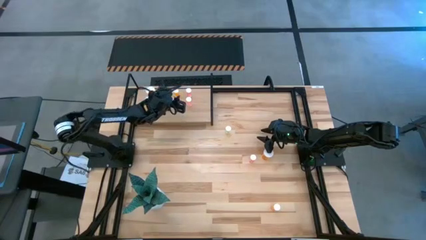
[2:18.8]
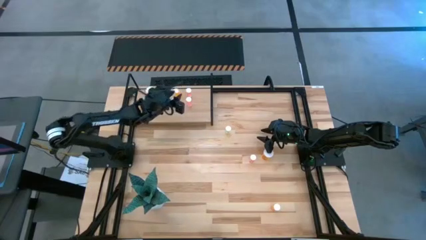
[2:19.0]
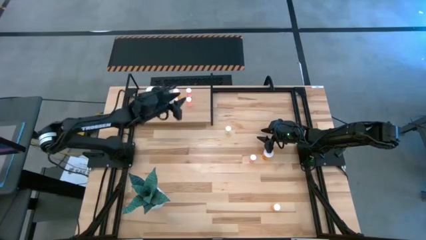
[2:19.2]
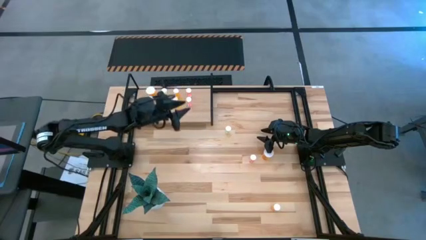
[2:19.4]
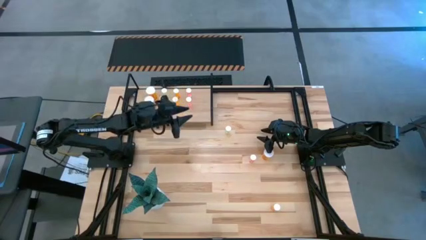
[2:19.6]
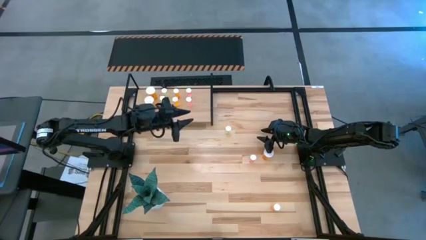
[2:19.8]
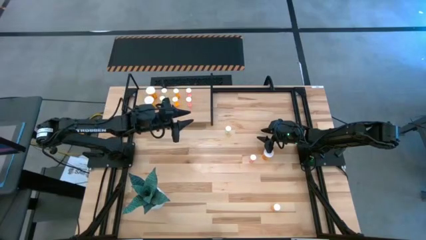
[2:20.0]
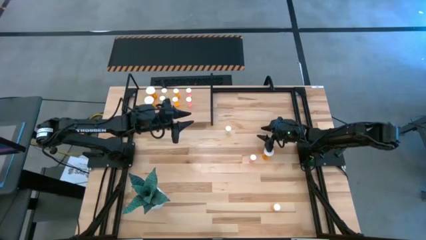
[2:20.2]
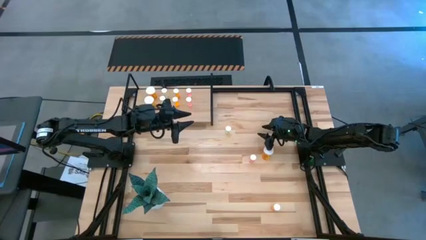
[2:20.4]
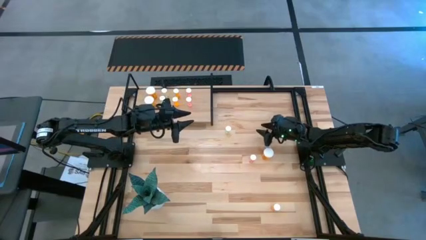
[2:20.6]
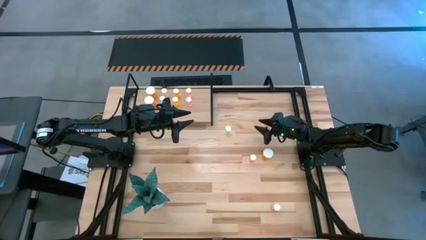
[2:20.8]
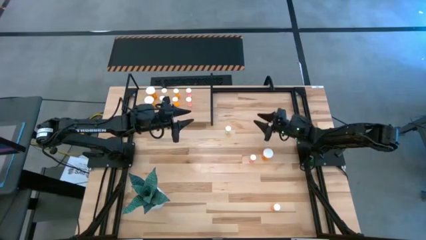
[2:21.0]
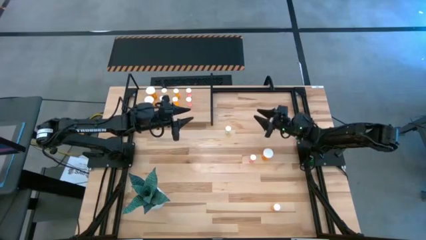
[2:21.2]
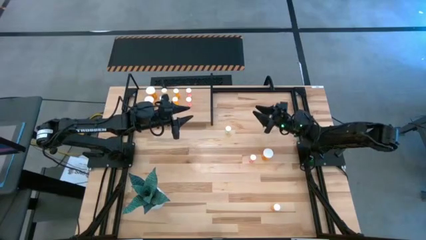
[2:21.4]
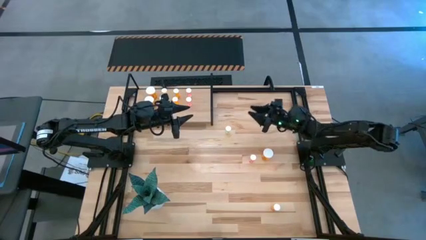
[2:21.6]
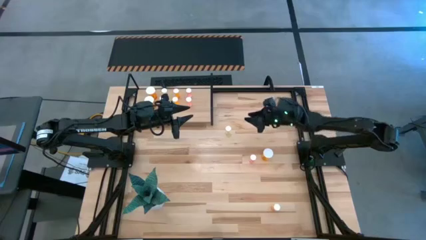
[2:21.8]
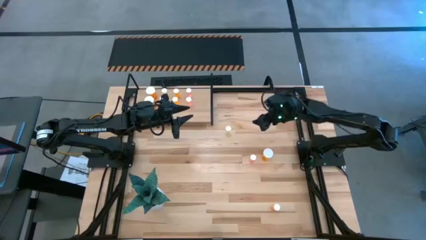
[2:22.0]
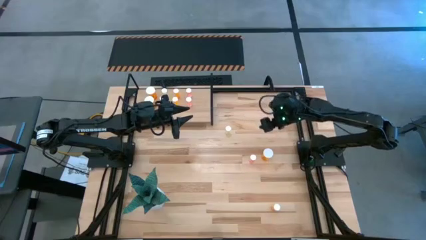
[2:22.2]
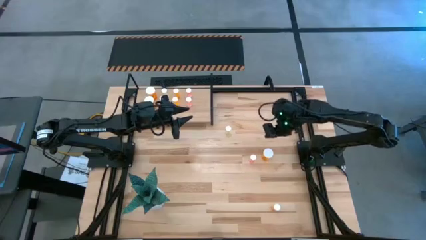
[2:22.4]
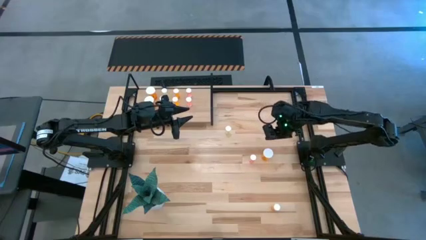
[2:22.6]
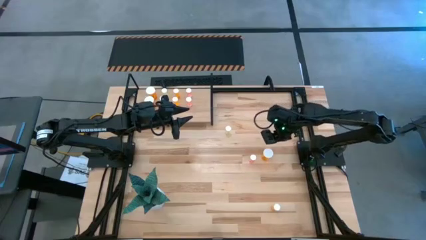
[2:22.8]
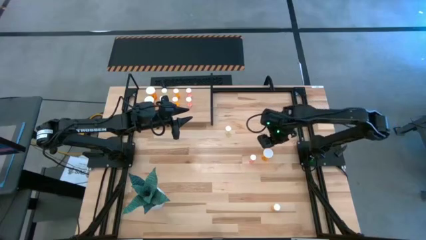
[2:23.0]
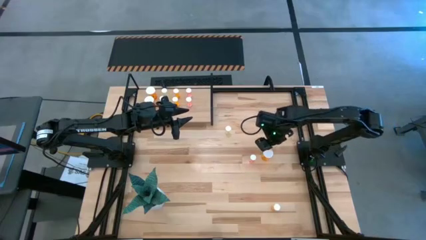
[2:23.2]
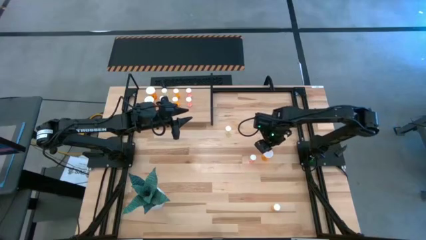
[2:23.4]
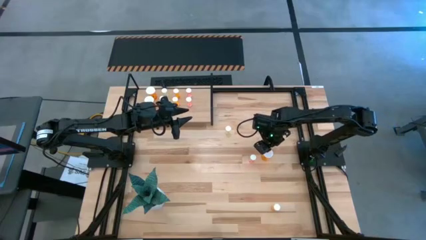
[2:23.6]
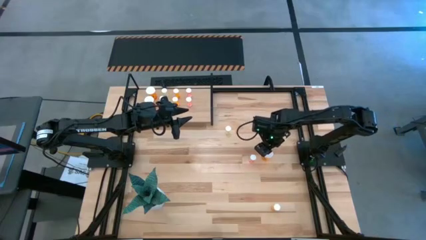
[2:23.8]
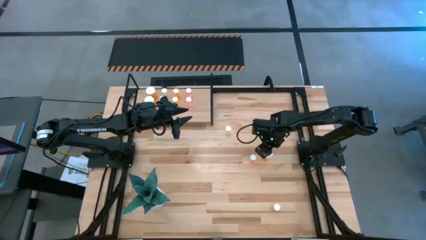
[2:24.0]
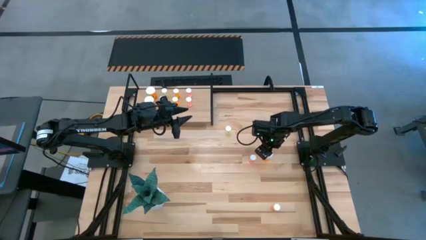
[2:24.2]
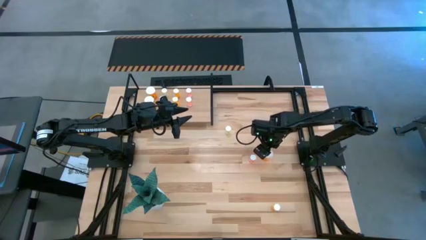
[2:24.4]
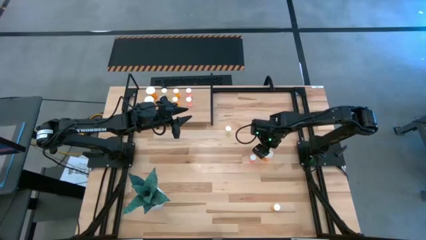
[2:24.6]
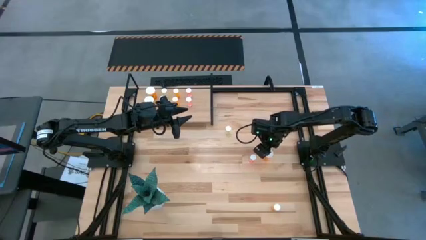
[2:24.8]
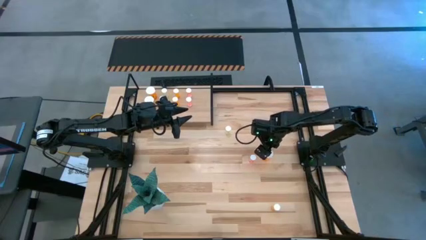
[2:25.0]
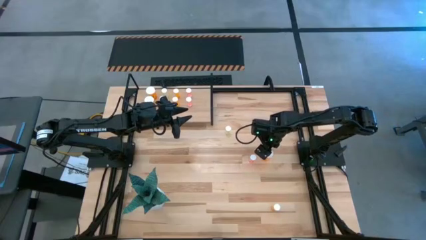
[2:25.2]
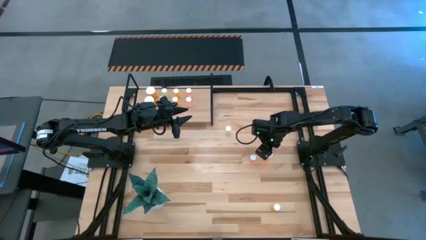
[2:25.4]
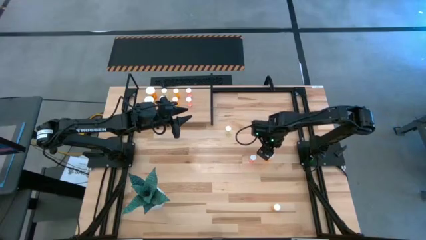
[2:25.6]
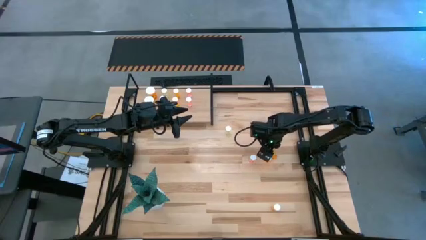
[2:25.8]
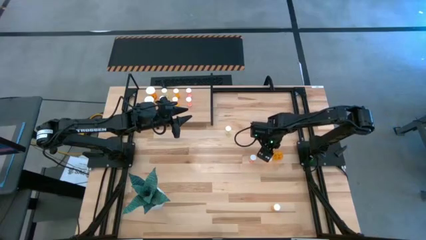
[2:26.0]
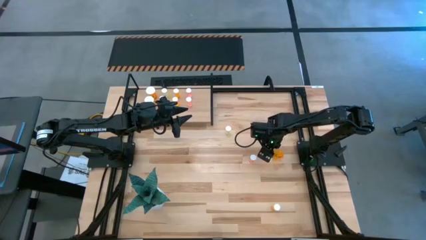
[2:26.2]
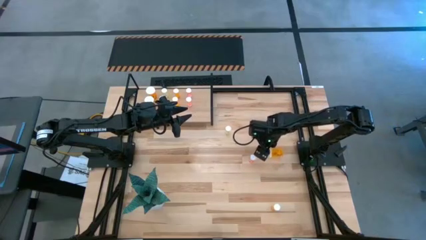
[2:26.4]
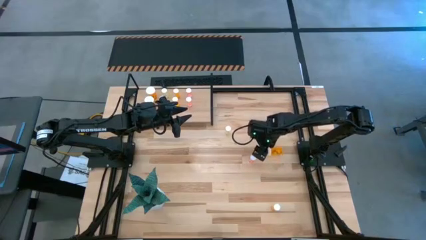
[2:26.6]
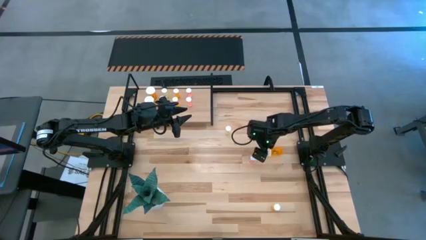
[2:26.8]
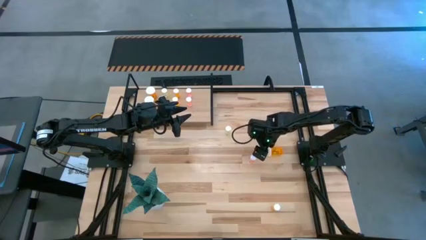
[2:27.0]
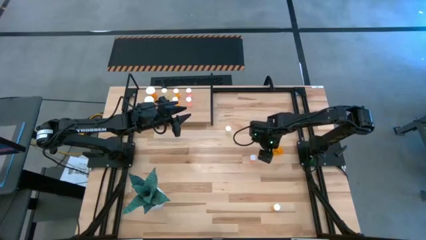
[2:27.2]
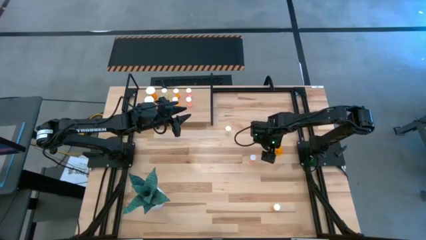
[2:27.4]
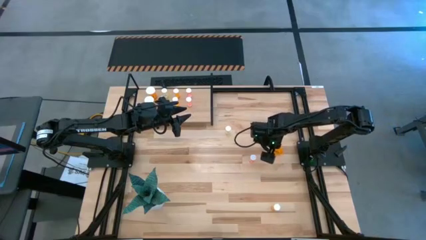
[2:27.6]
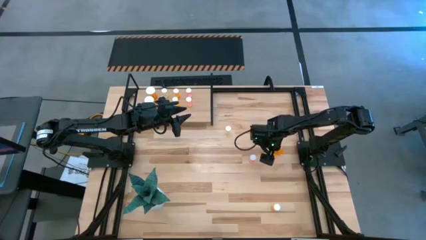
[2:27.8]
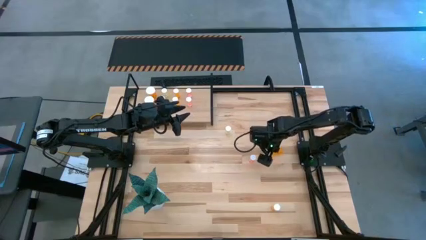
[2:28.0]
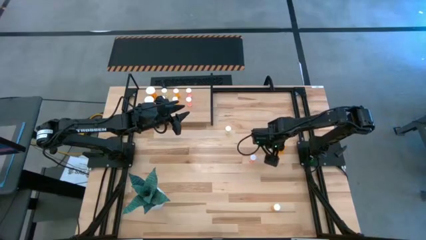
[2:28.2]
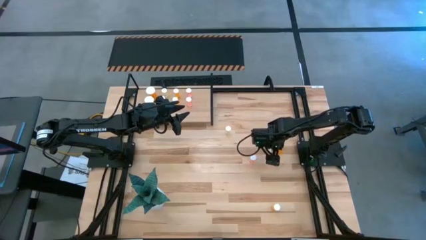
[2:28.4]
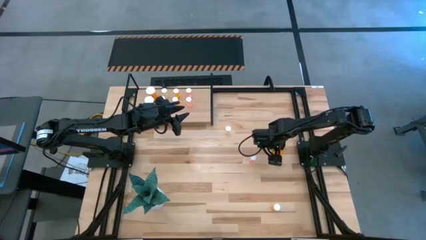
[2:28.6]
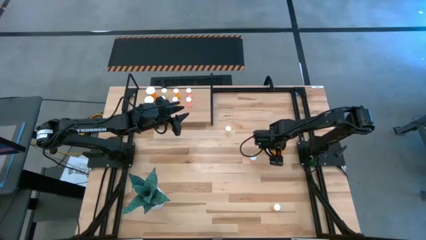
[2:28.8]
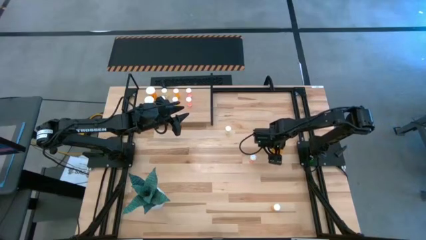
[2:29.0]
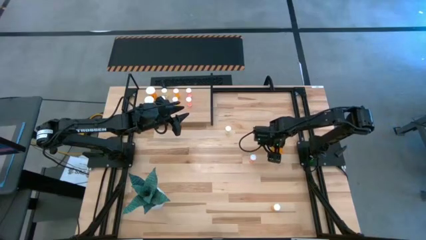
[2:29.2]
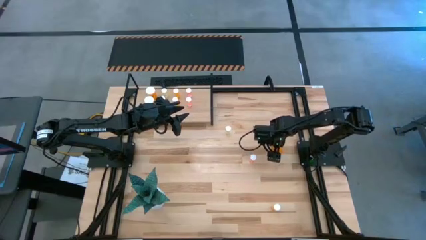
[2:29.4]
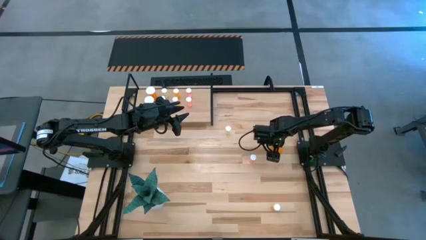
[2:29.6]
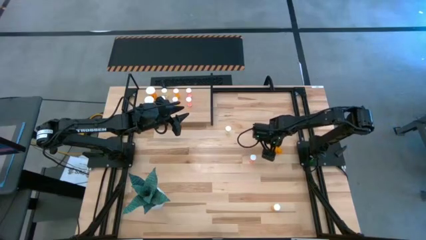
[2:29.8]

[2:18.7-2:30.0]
Task: Pick and place medicine bottles onto shelf by color
Put the big orange pill bottle aligned with the other orange pill bottle on the shelf
